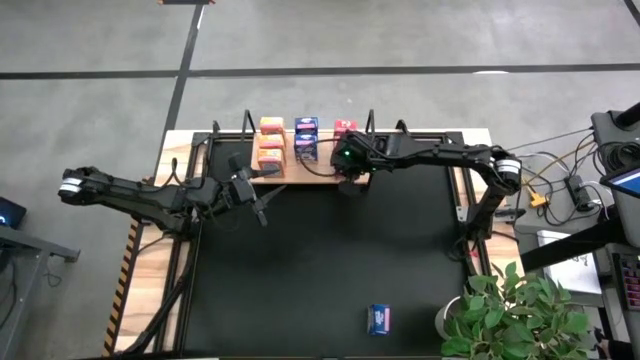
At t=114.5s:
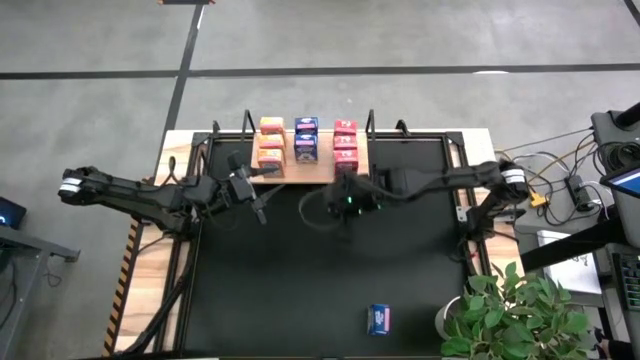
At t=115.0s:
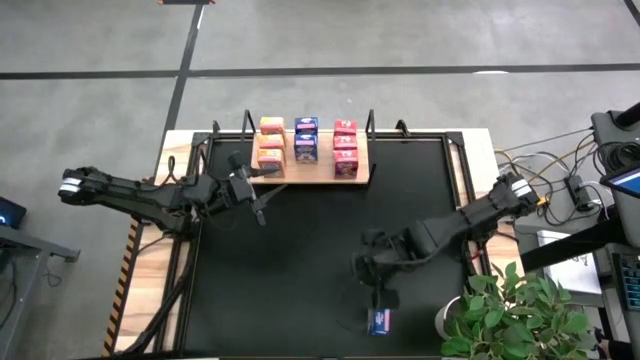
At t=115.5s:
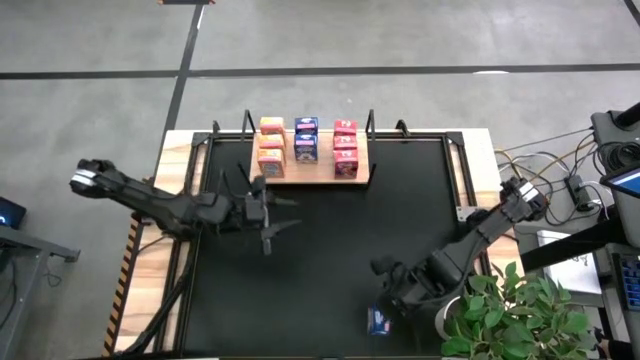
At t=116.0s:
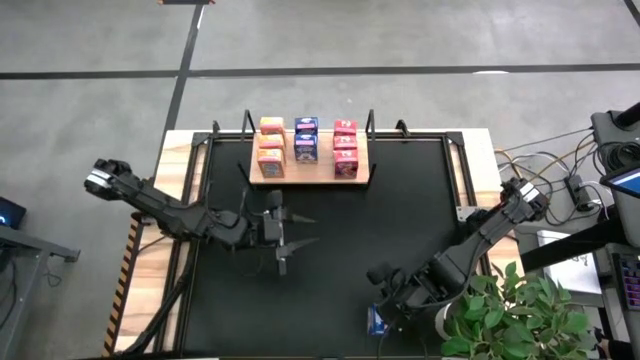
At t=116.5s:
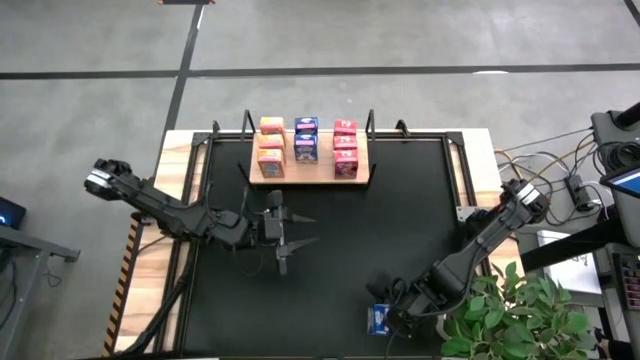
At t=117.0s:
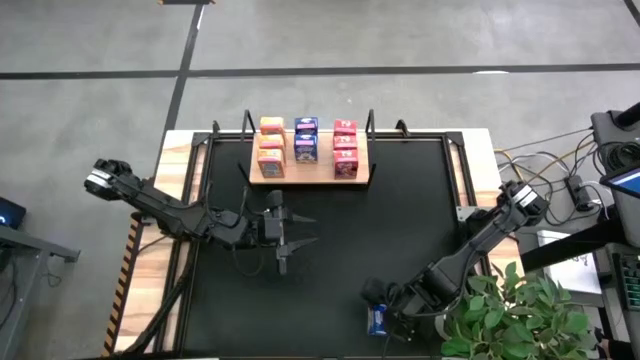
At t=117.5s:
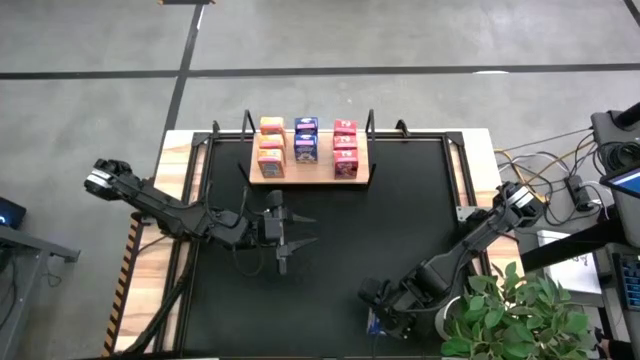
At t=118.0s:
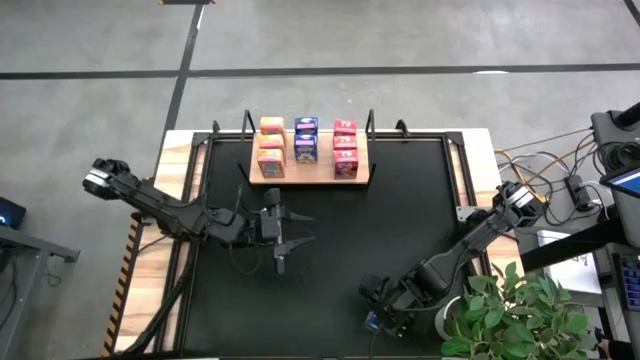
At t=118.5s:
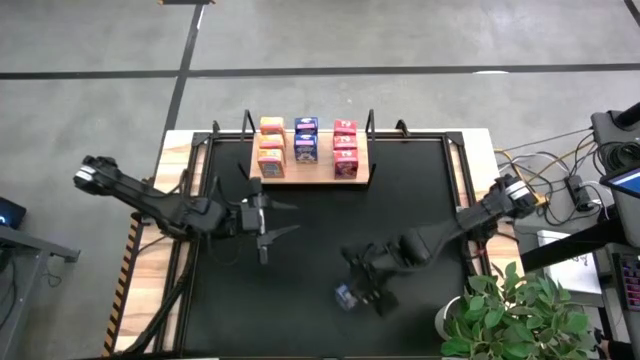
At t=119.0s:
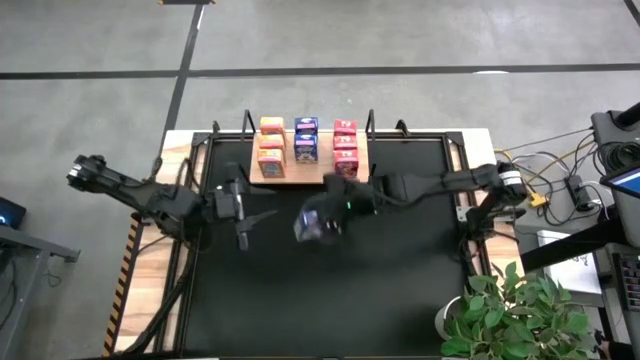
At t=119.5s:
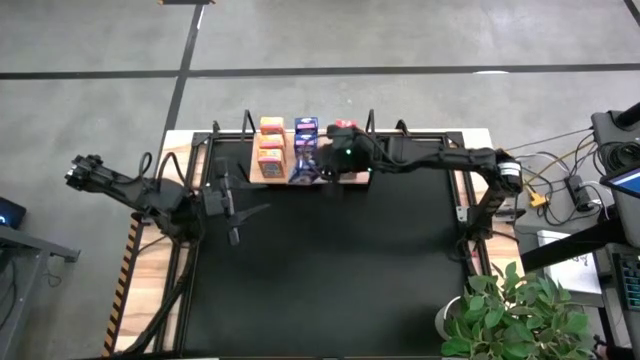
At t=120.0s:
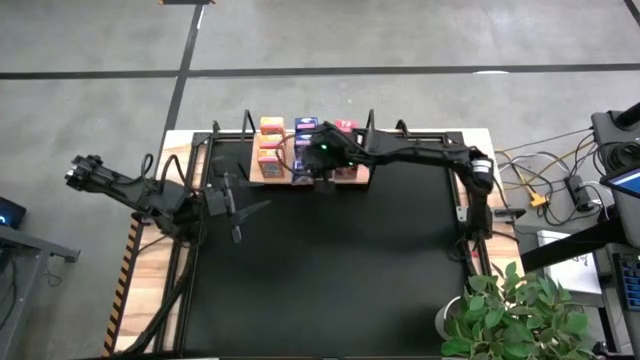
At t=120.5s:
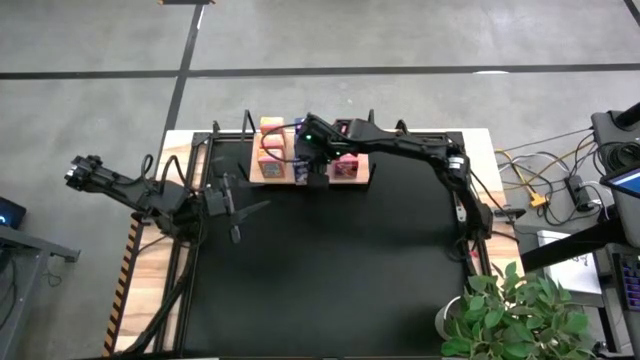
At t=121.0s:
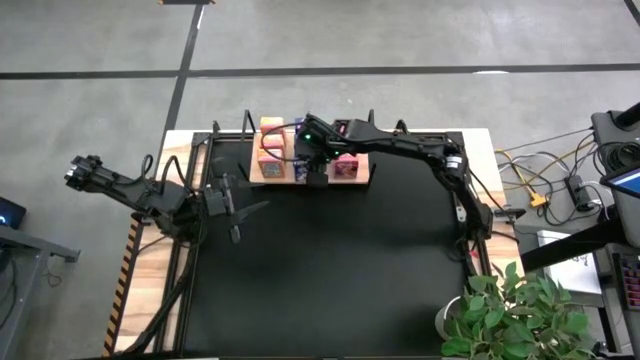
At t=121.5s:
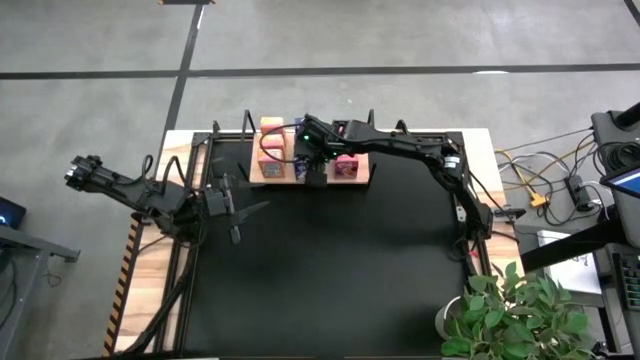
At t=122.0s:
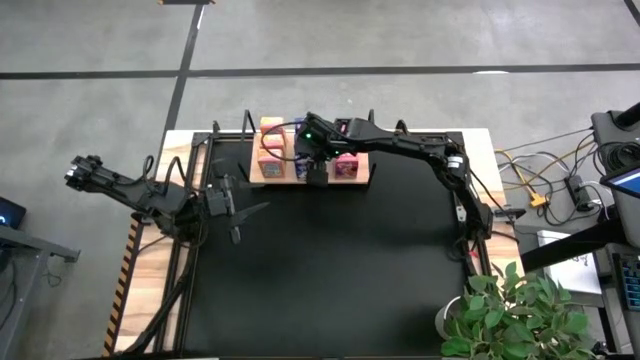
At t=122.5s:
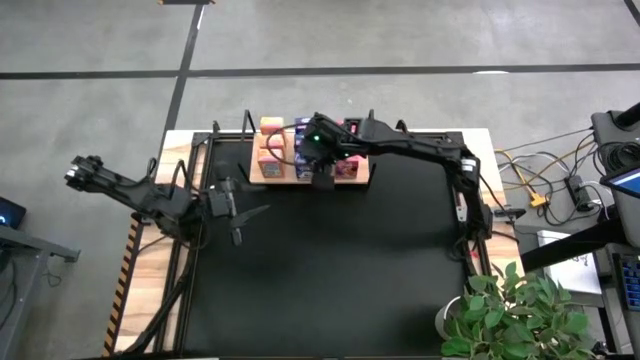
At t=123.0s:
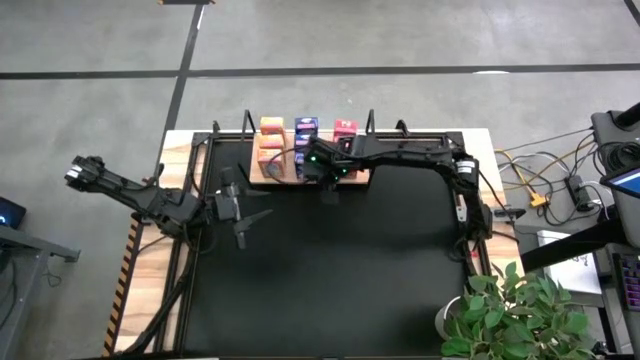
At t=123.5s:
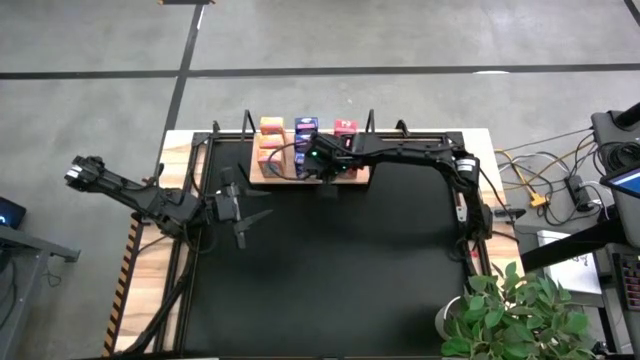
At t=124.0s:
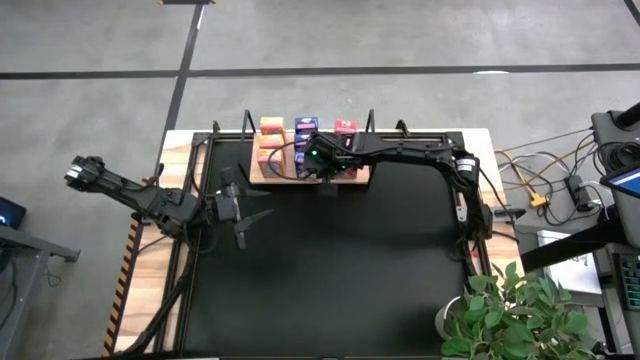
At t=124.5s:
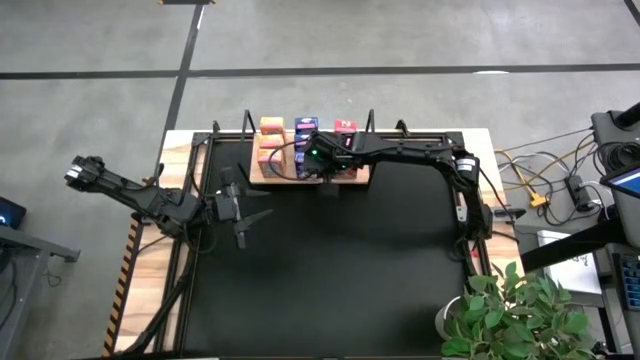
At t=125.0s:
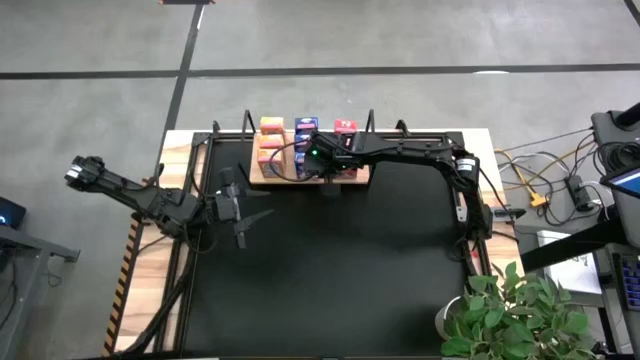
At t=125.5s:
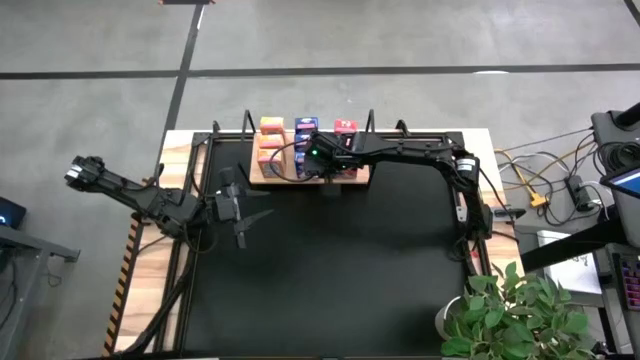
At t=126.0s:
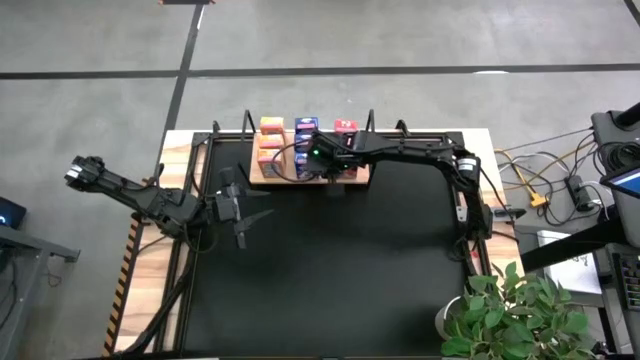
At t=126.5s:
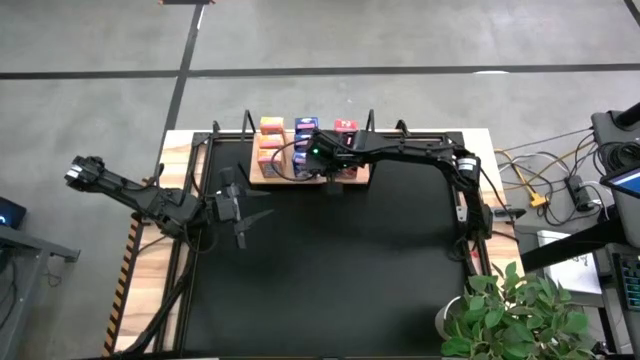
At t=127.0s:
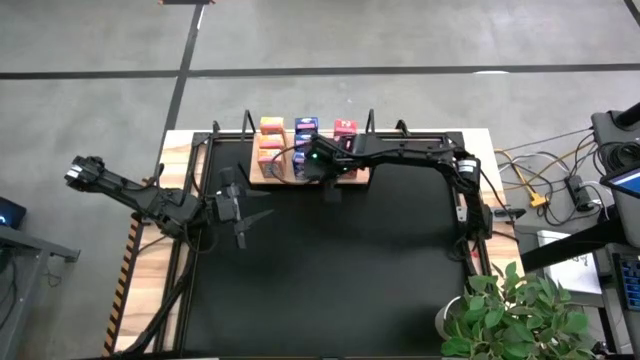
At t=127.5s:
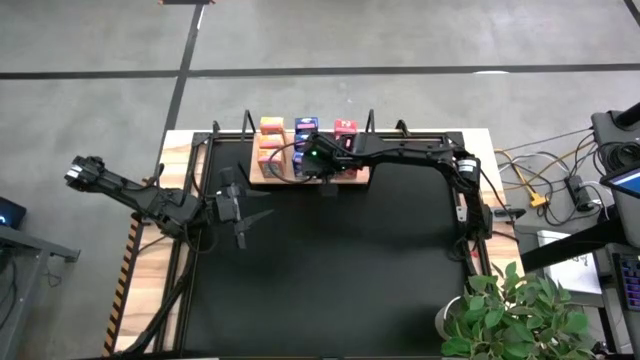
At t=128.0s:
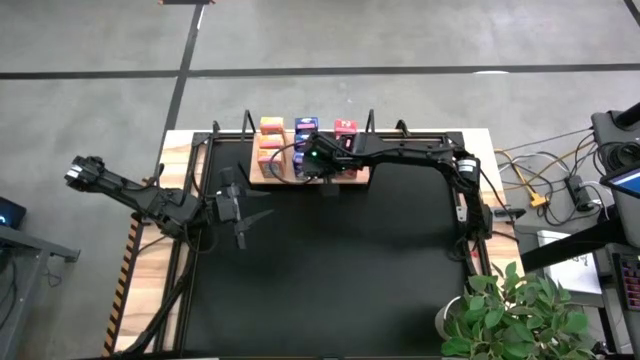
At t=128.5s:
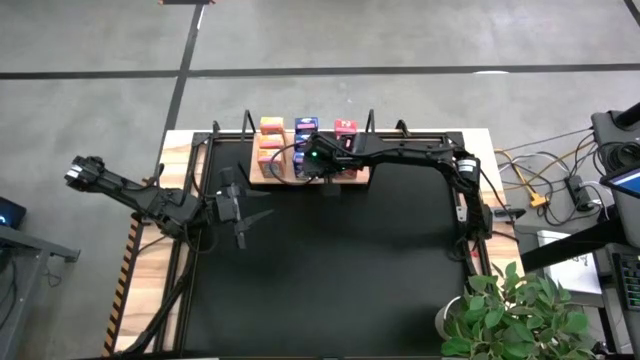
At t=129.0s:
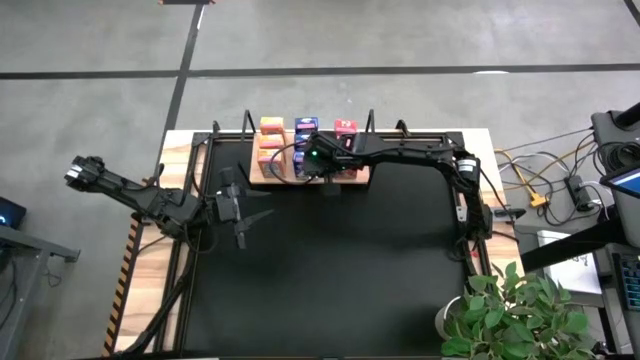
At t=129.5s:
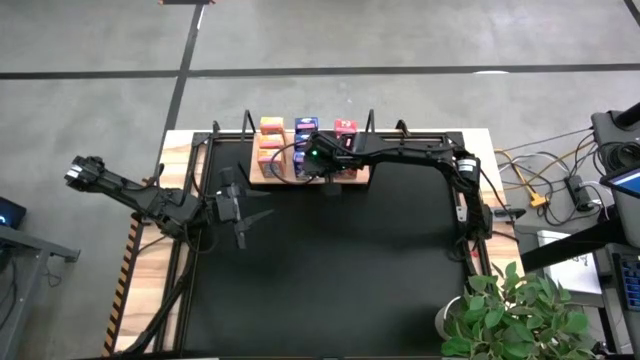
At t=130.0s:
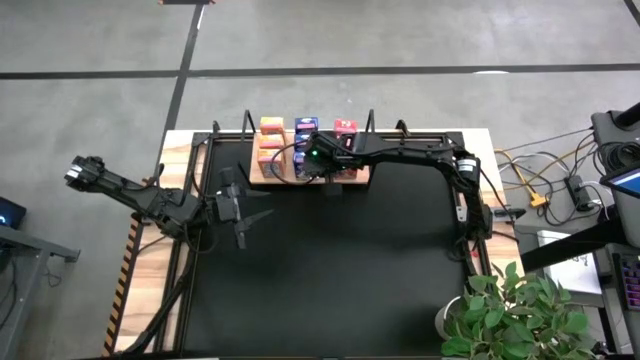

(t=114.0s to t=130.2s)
Task: Stack cereal on shelf
Put the blue cereal box on the shelf aligned with other blue cereal boxes

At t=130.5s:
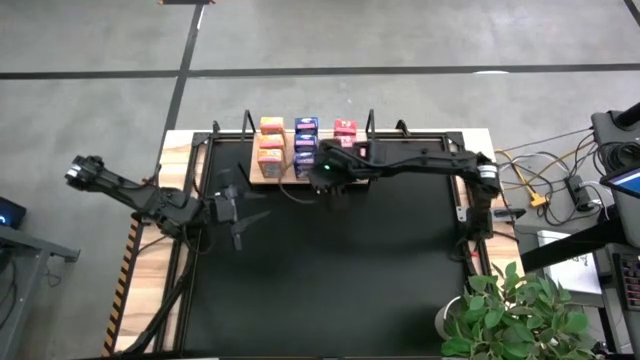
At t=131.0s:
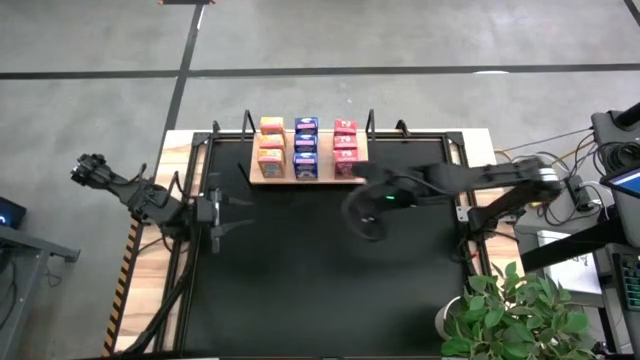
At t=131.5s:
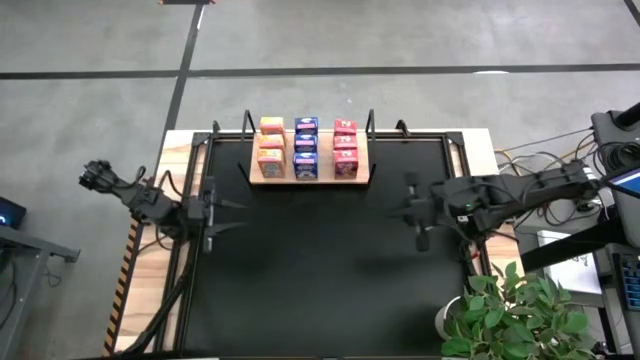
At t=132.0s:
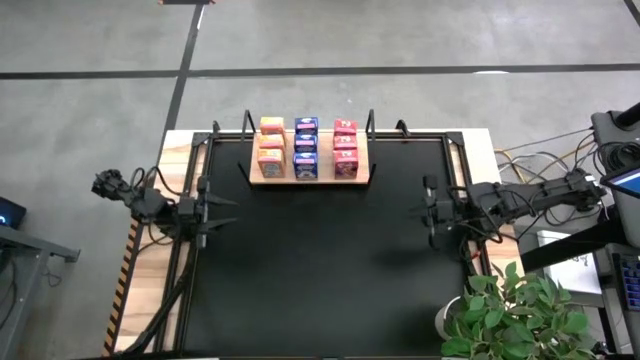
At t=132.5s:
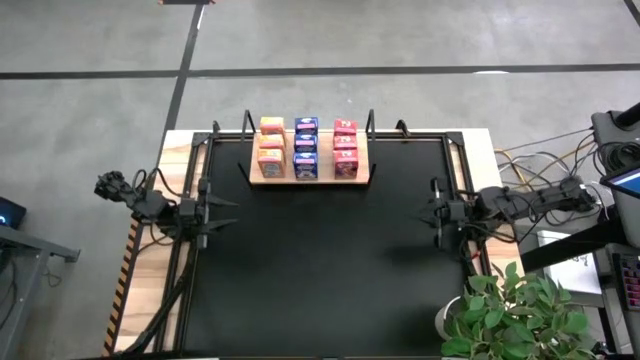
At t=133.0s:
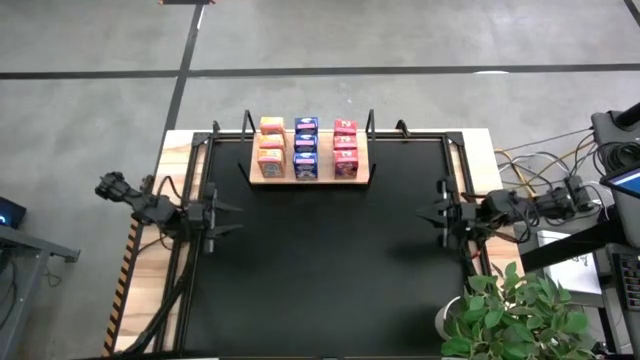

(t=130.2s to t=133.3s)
Return to Home Position

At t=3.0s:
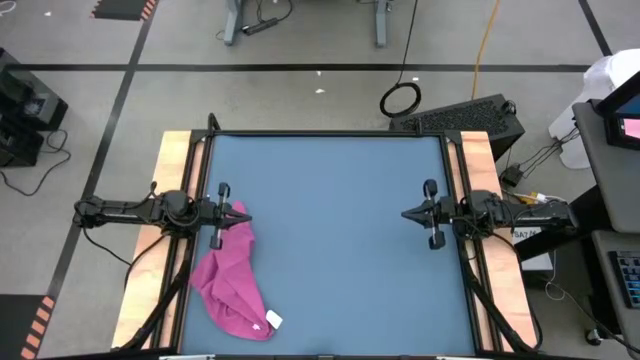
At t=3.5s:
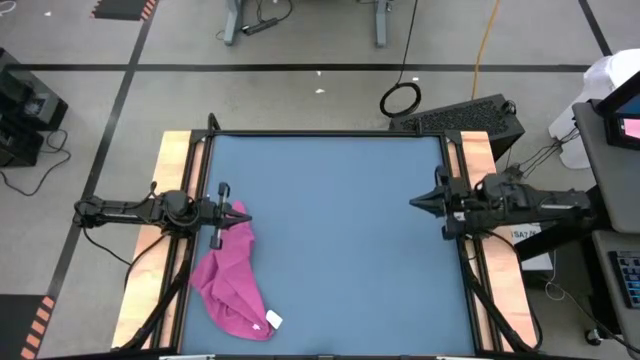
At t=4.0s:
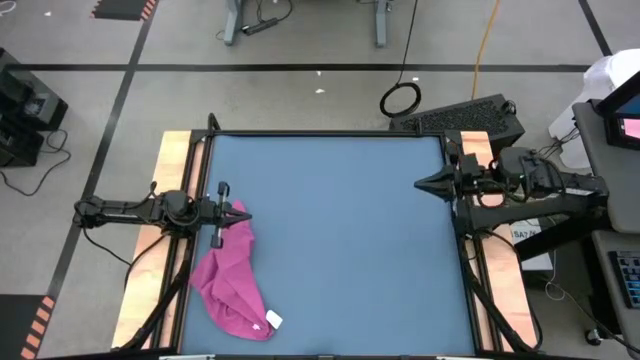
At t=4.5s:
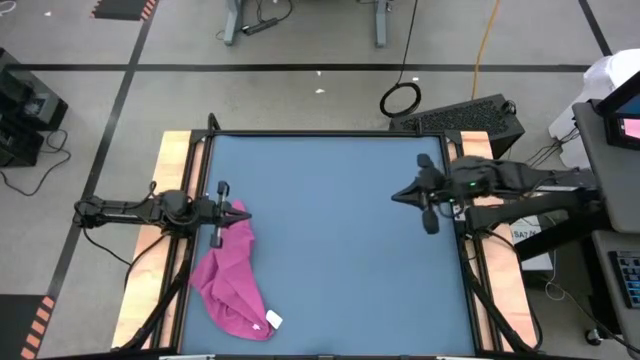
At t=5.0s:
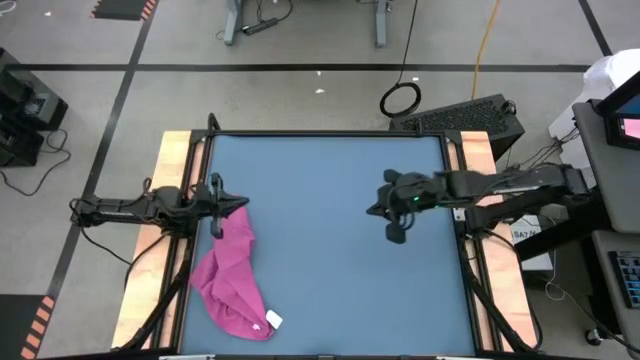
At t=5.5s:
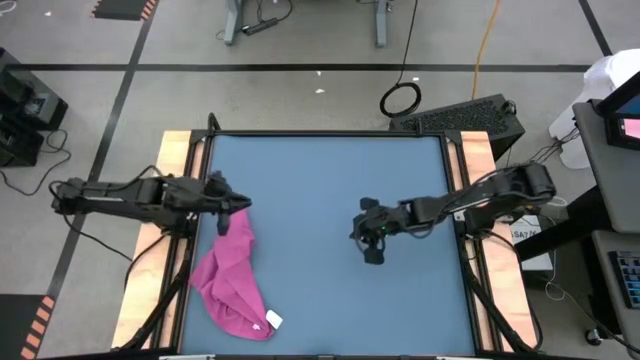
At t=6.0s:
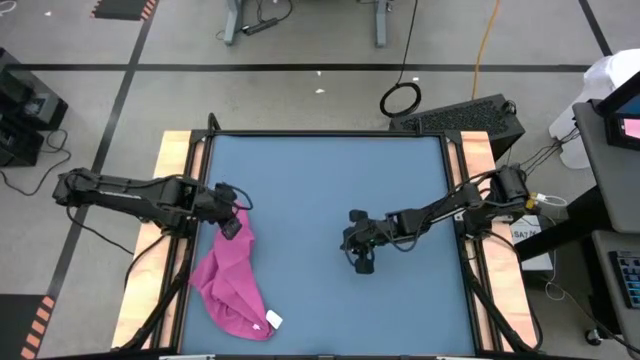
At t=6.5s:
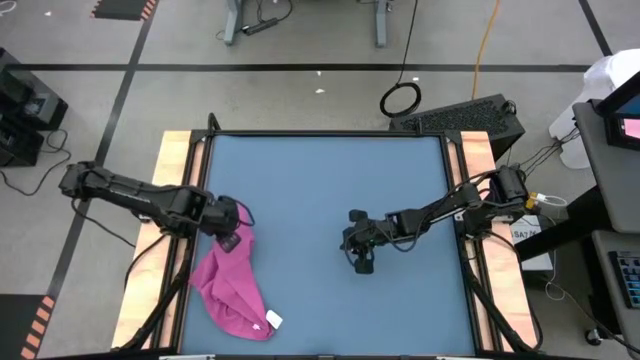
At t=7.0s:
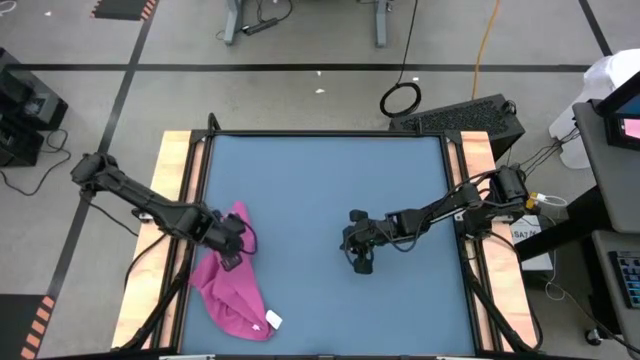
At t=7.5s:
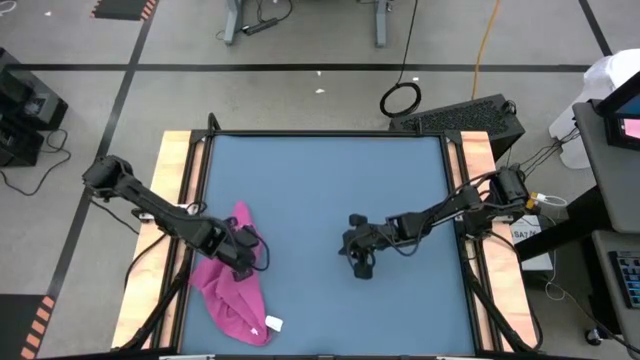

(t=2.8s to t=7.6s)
Task: Roll towel into tight, uniform cylinder
Fold the pink towel
